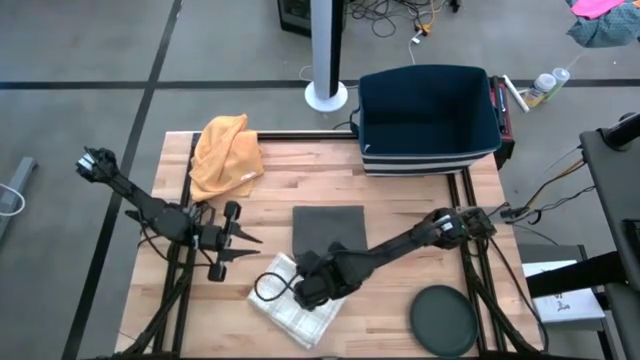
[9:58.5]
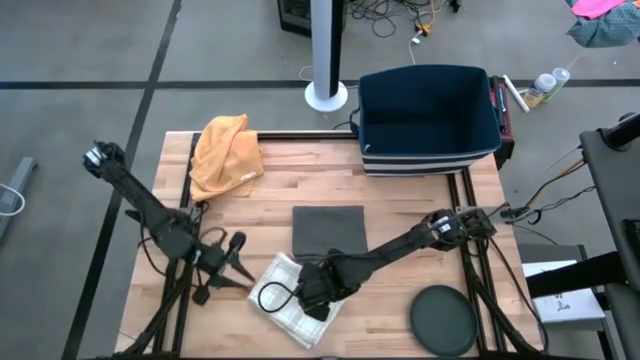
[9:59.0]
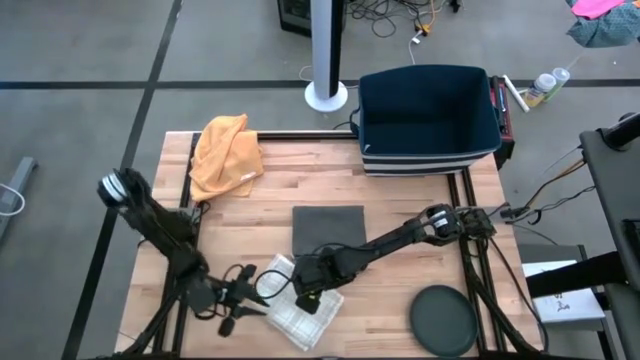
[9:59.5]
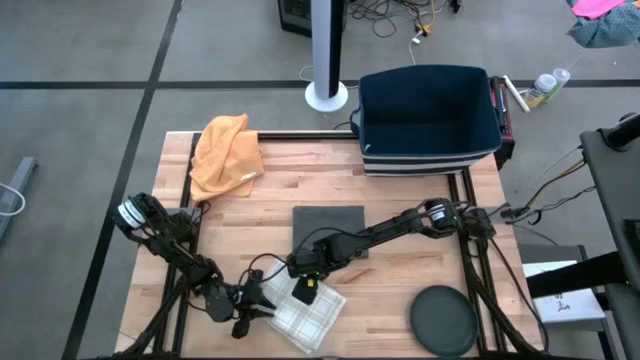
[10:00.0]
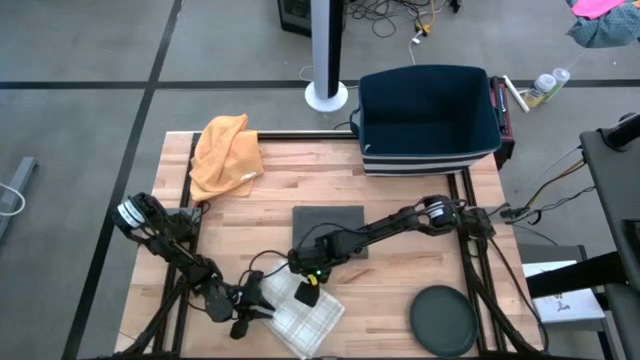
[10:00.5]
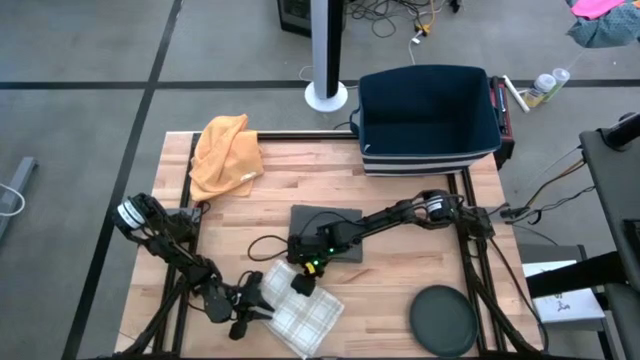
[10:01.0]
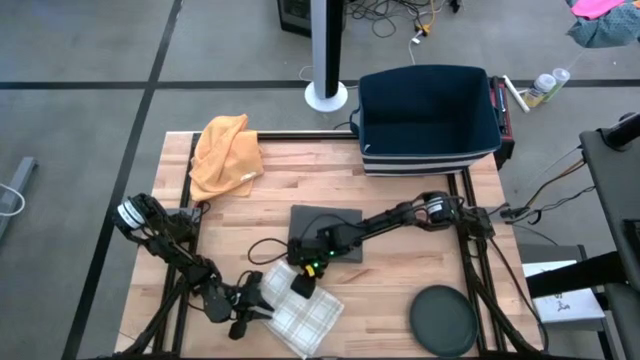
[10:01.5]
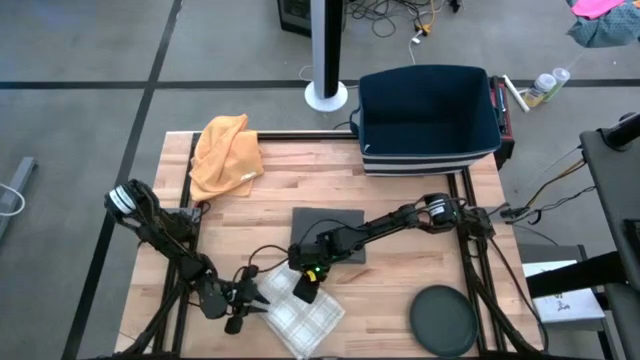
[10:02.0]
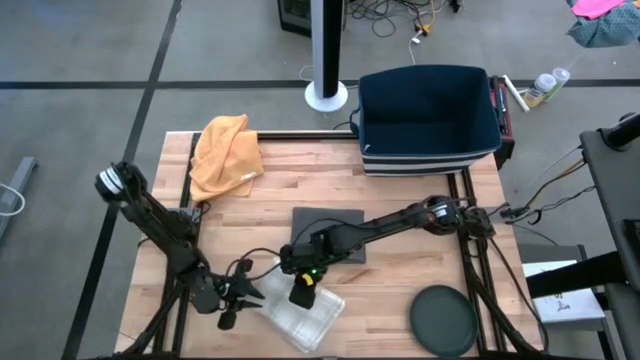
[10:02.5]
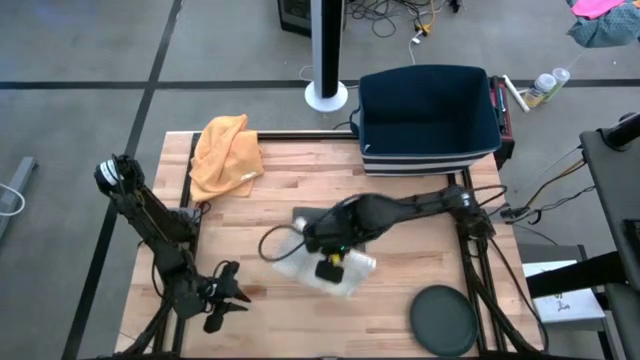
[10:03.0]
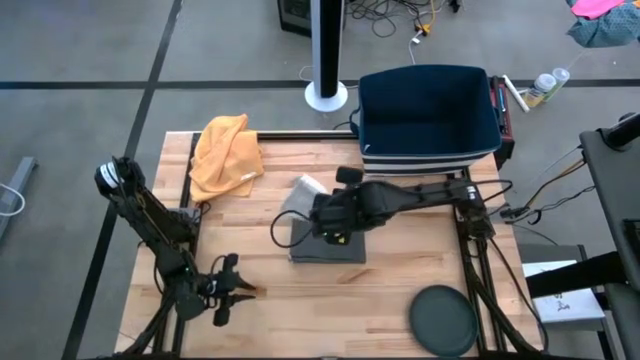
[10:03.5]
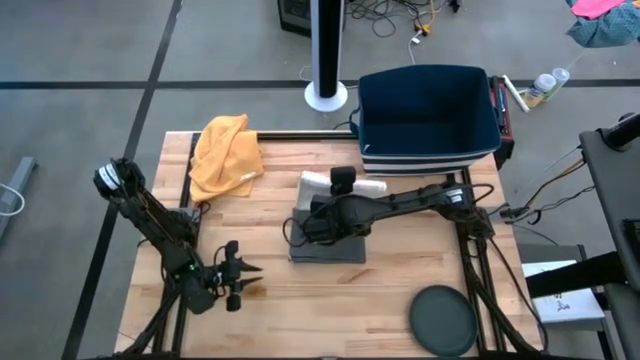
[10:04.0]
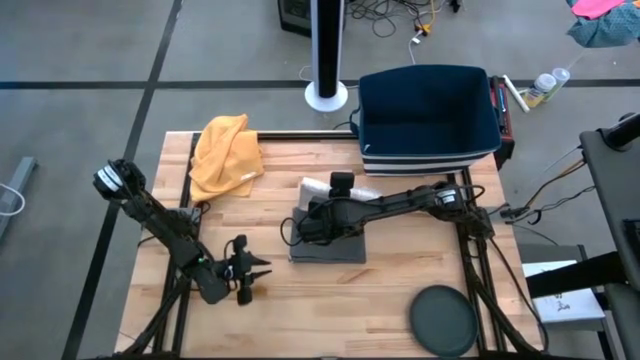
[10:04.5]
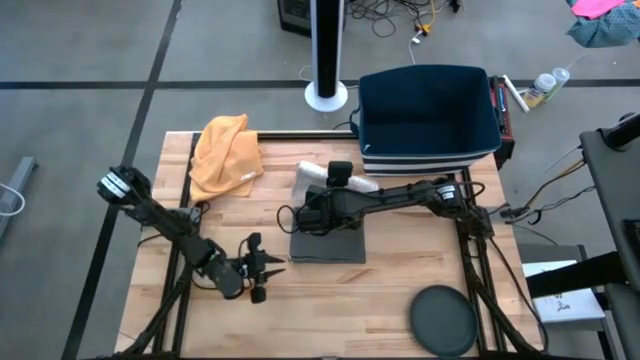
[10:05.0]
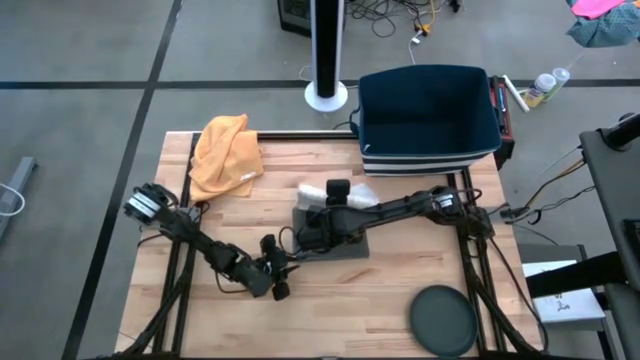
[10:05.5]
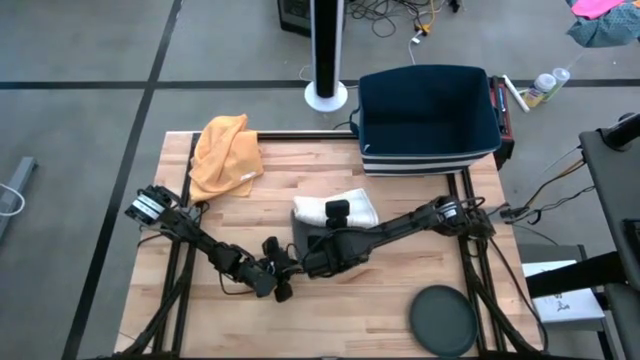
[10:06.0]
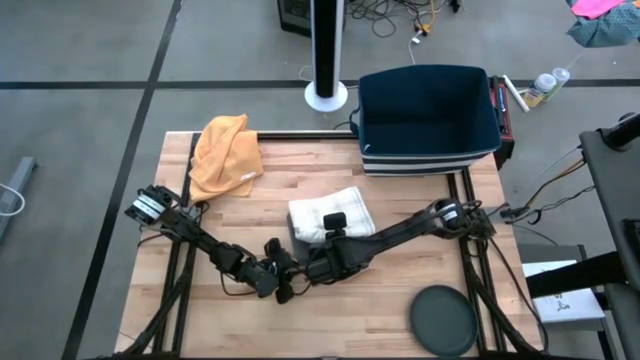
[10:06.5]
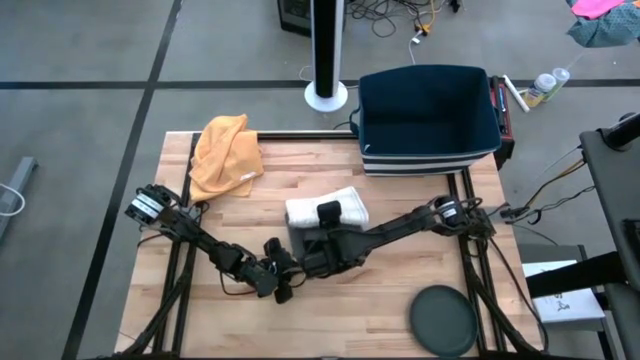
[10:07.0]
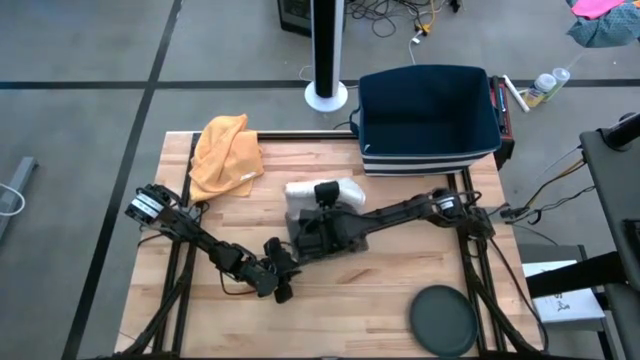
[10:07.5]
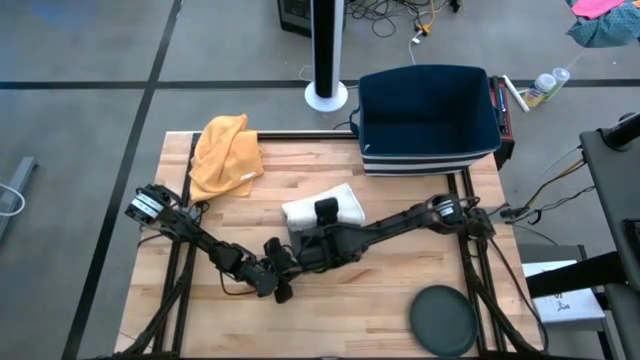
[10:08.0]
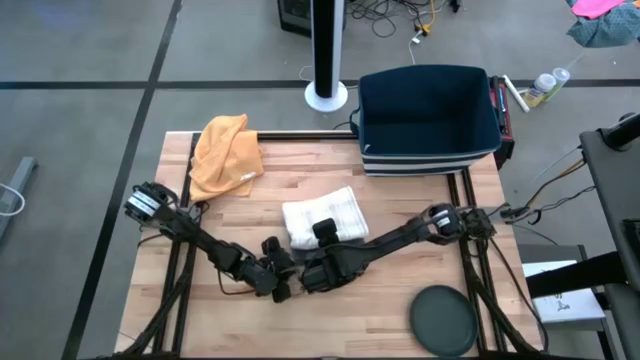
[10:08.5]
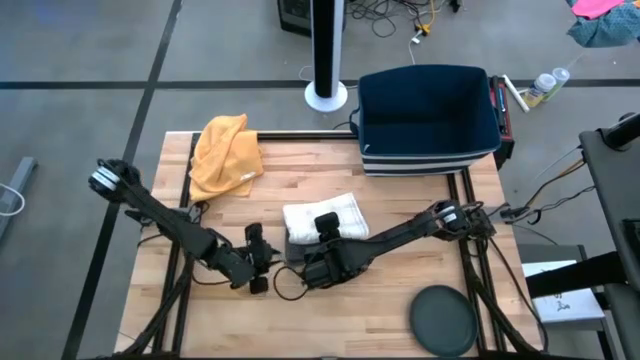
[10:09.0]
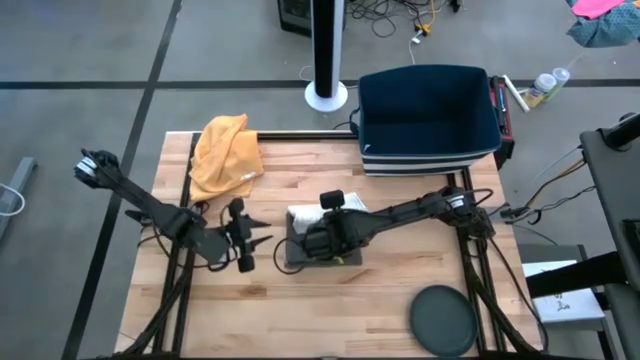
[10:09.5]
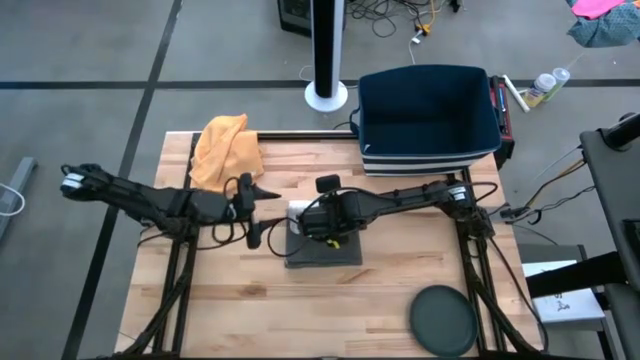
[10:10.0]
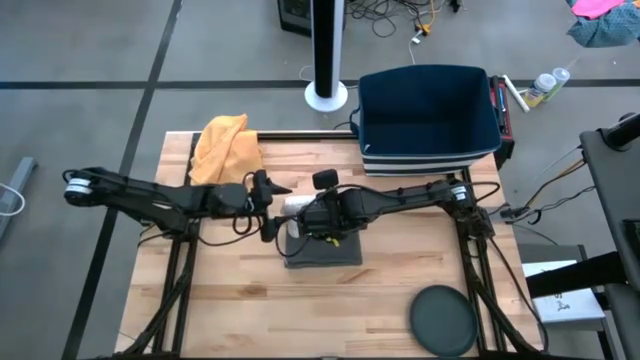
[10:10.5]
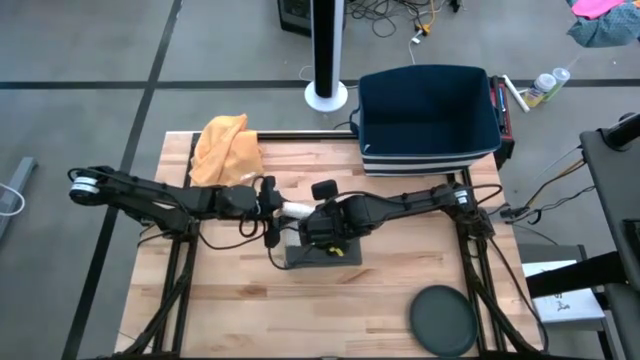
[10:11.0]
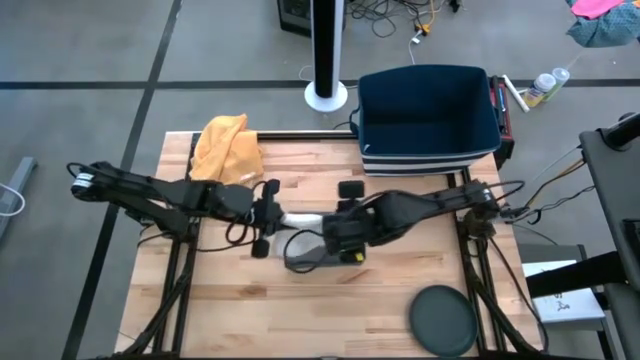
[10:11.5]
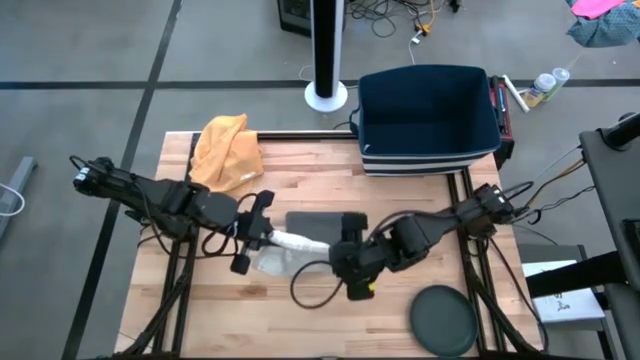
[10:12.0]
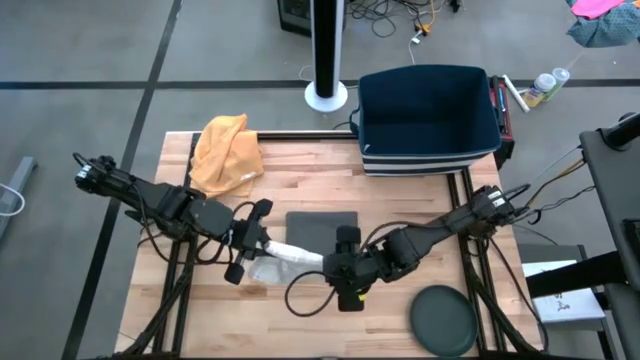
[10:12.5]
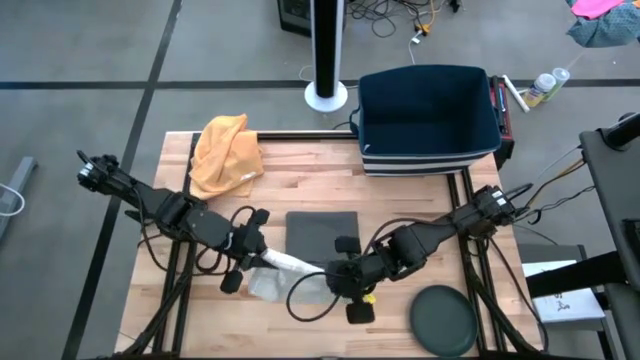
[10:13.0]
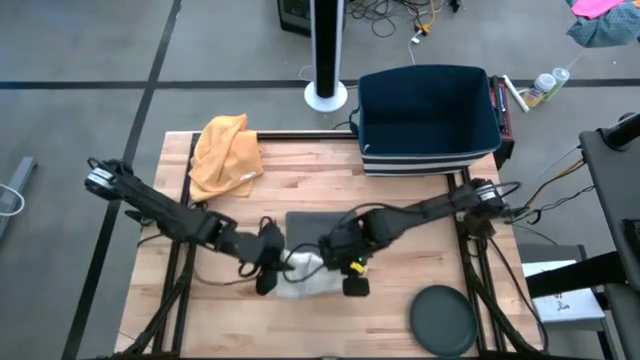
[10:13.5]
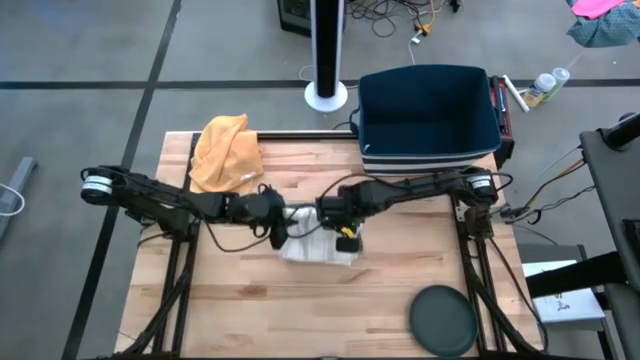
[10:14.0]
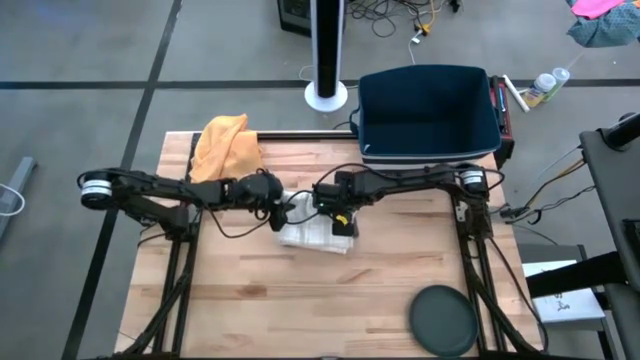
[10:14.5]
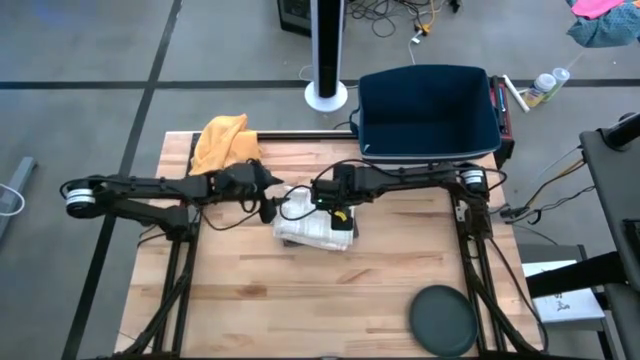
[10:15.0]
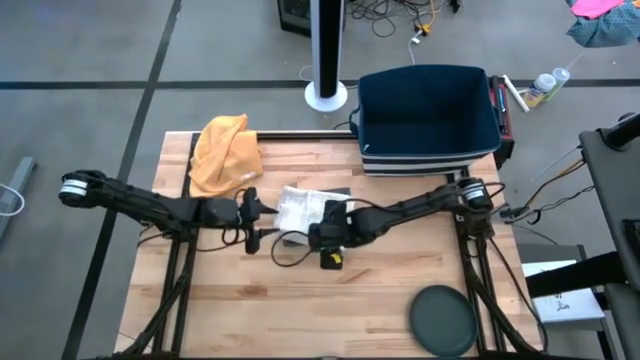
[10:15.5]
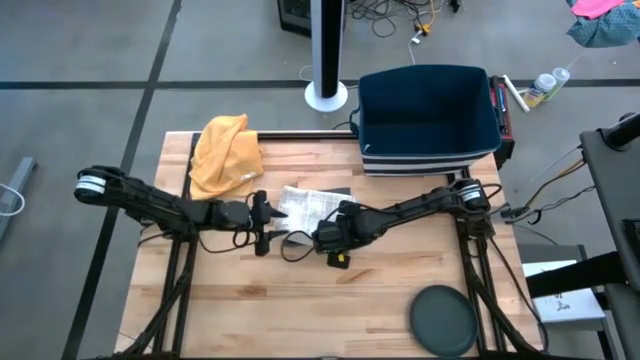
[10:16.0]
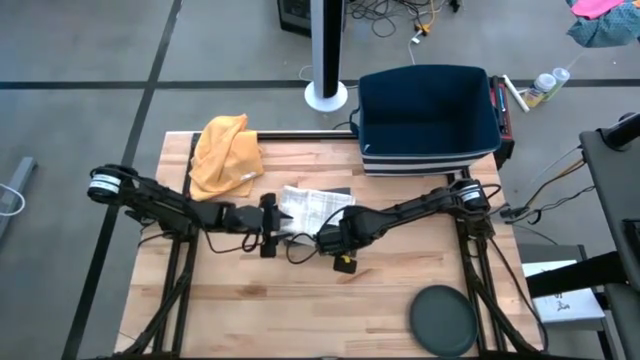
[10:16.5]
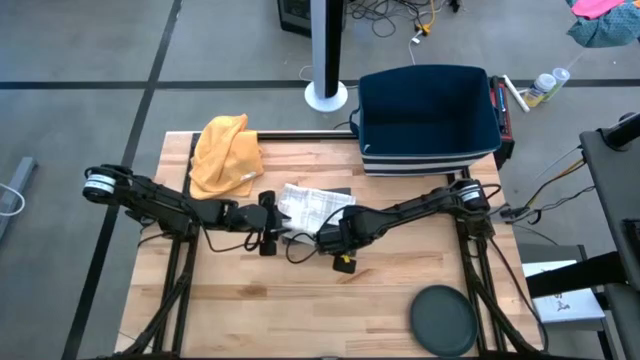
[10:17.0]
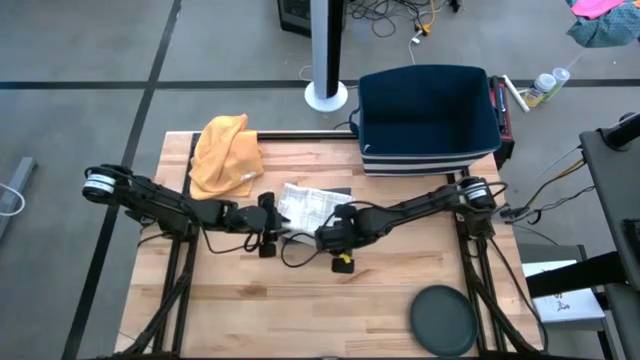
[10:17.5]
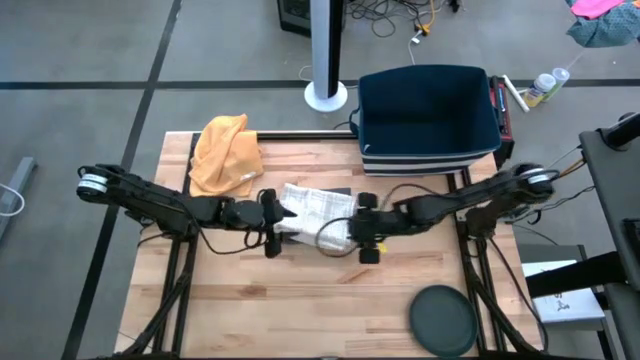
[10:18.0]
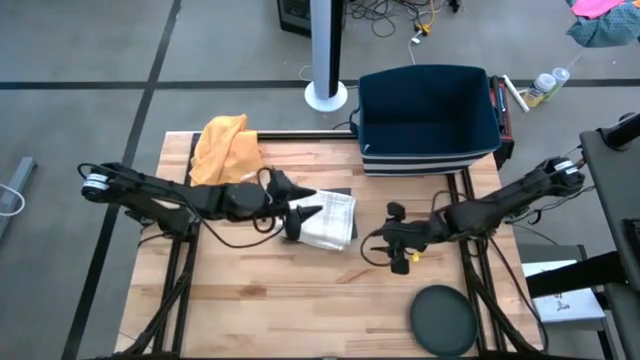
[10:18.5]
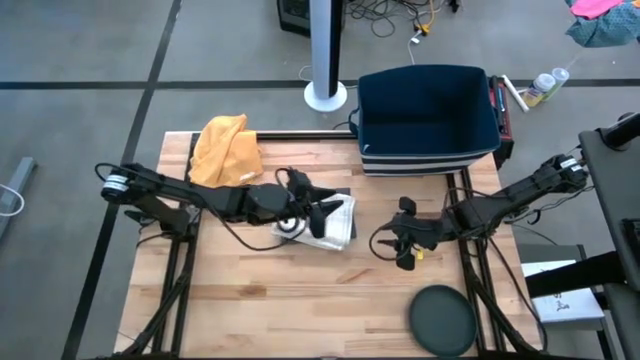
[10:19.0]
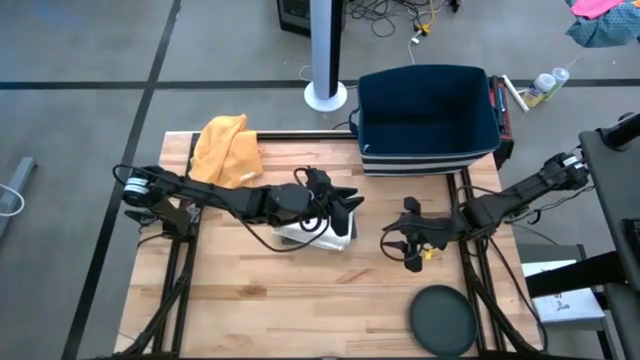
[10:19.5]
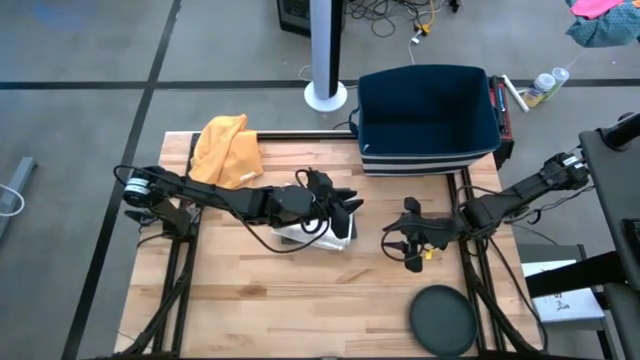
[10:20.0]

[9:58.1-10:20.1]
Task: Fold kitchen towel into neat rectangle
Stack the white patterned towel on top of the gray towel
